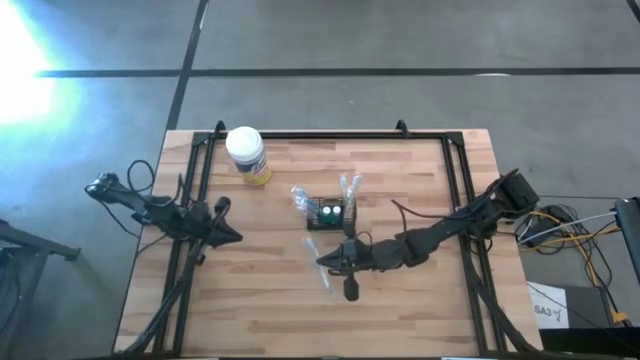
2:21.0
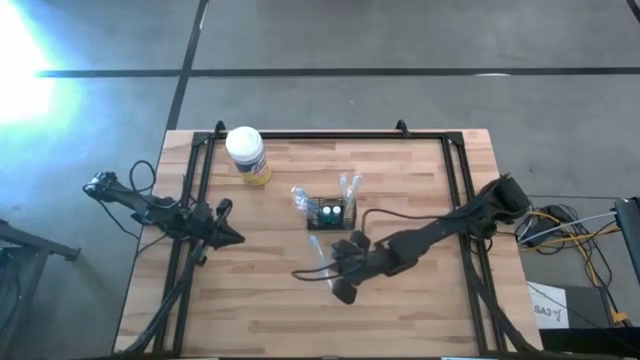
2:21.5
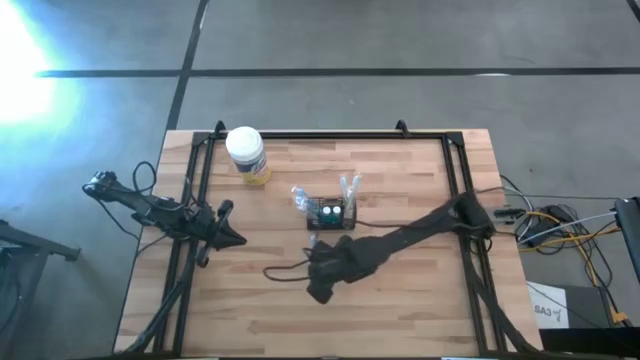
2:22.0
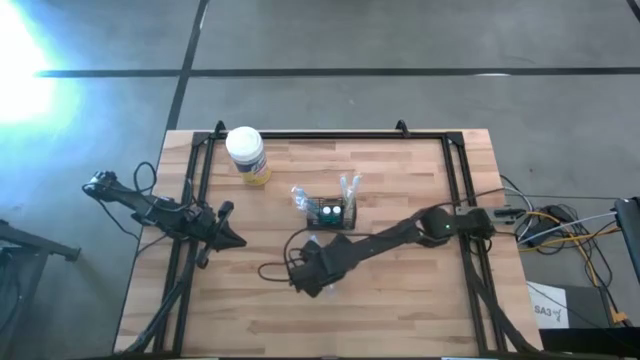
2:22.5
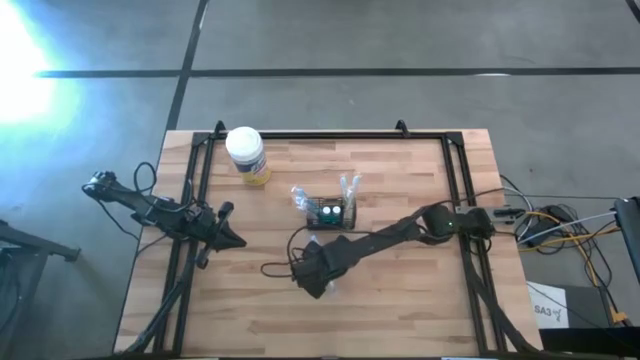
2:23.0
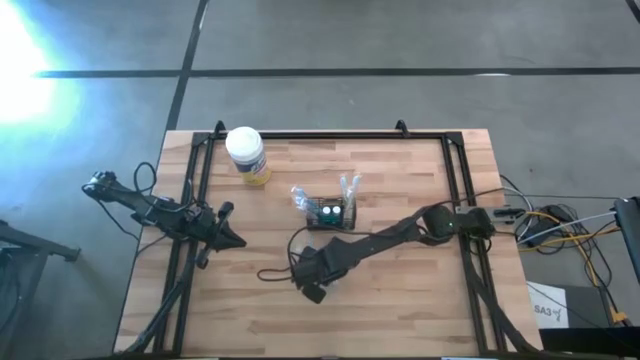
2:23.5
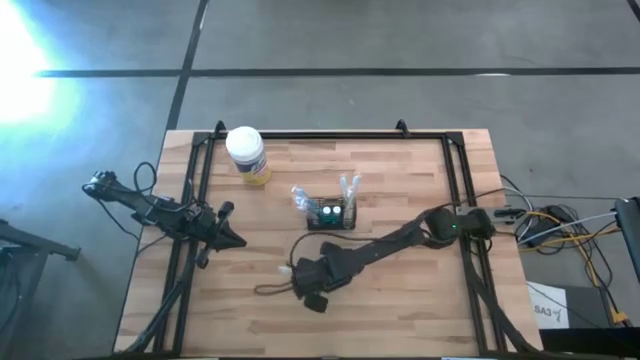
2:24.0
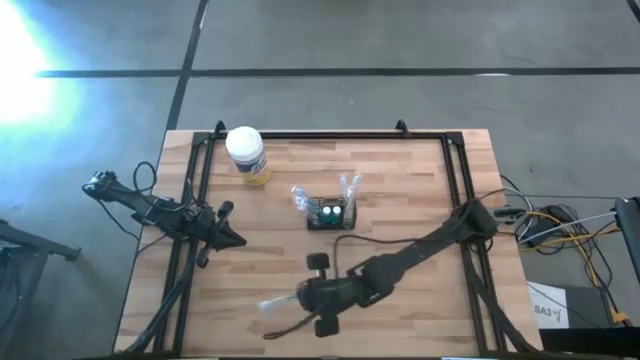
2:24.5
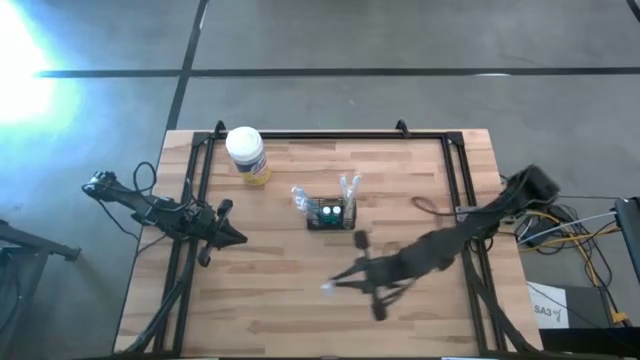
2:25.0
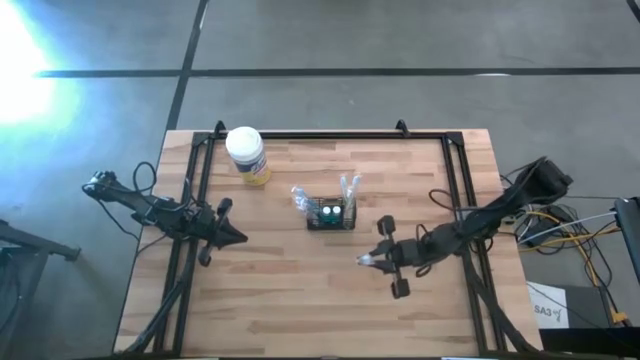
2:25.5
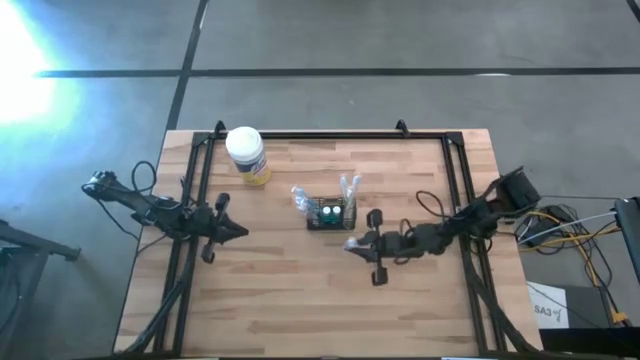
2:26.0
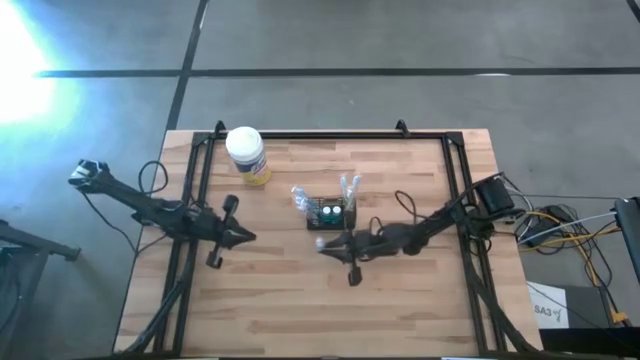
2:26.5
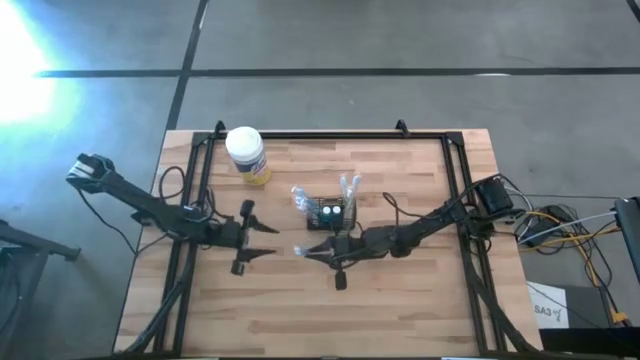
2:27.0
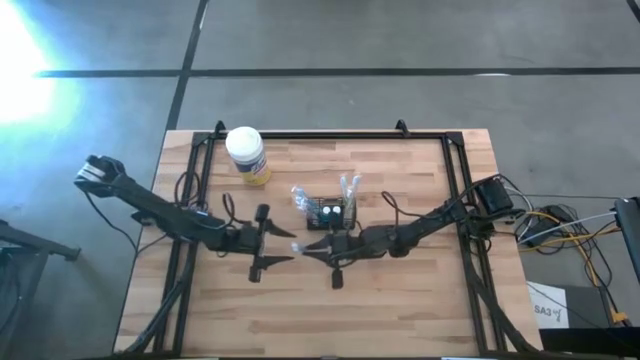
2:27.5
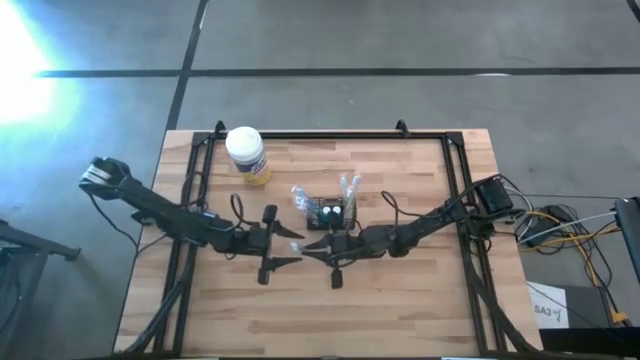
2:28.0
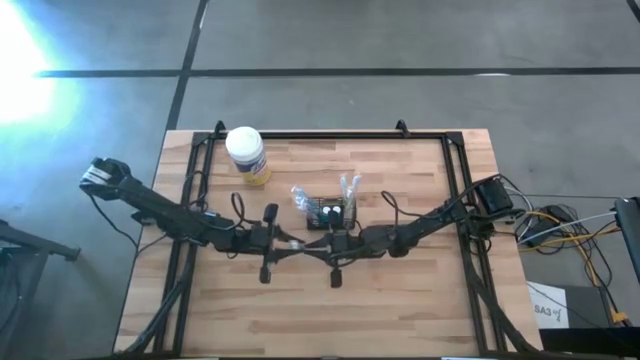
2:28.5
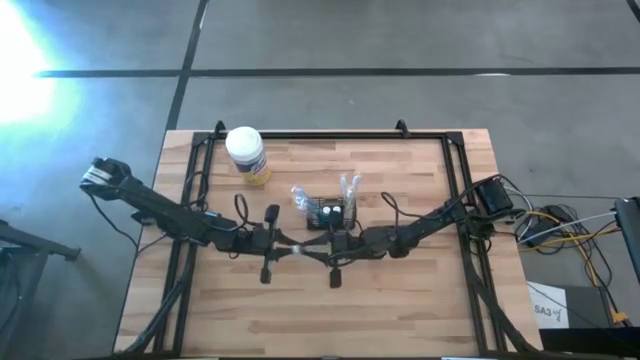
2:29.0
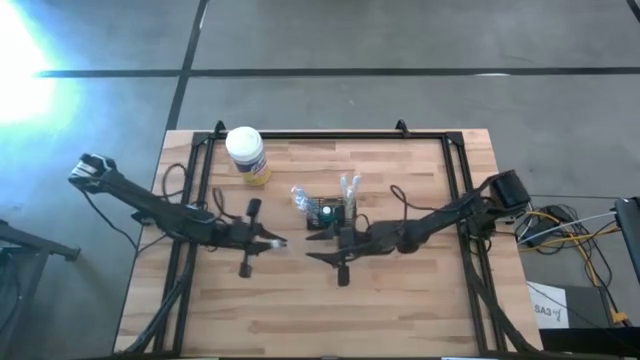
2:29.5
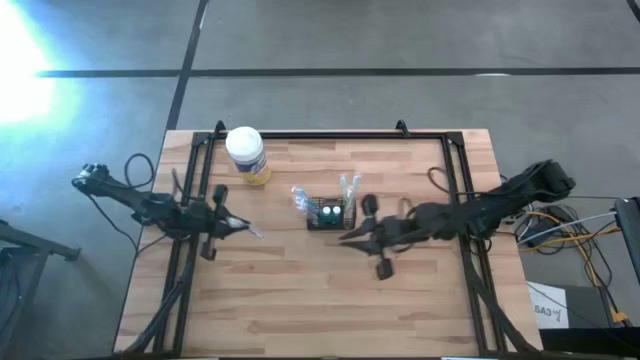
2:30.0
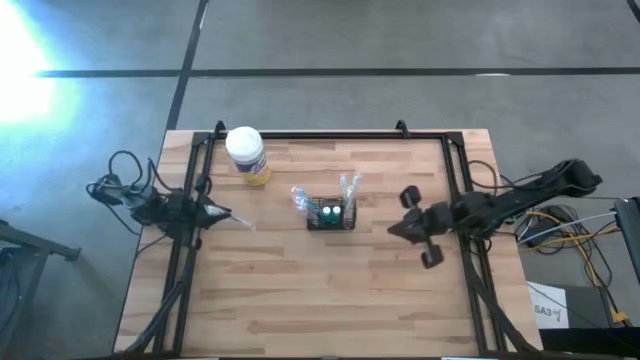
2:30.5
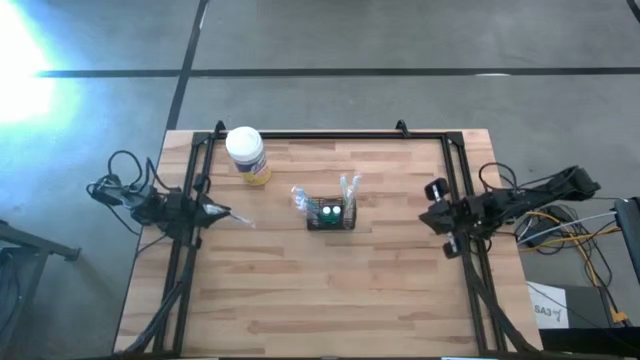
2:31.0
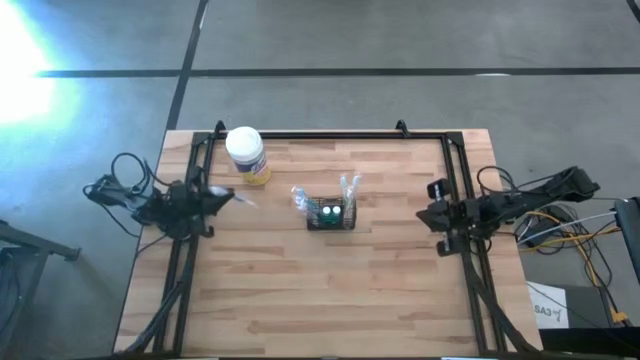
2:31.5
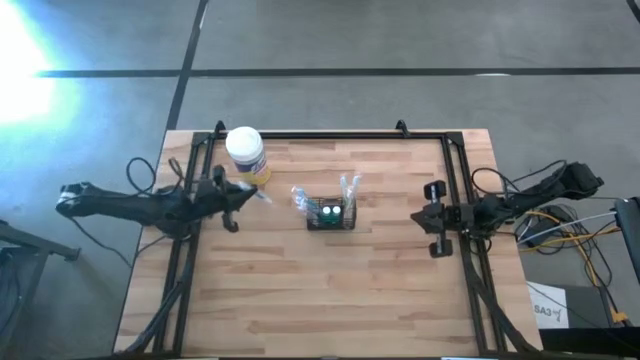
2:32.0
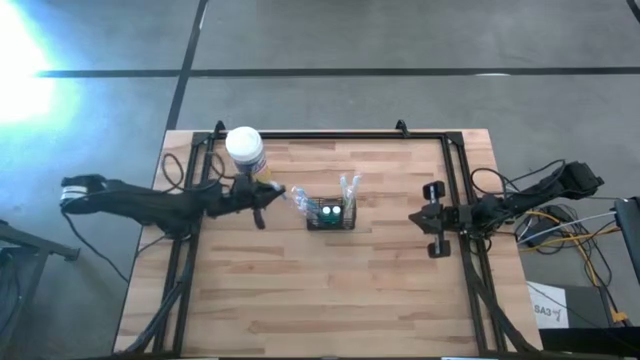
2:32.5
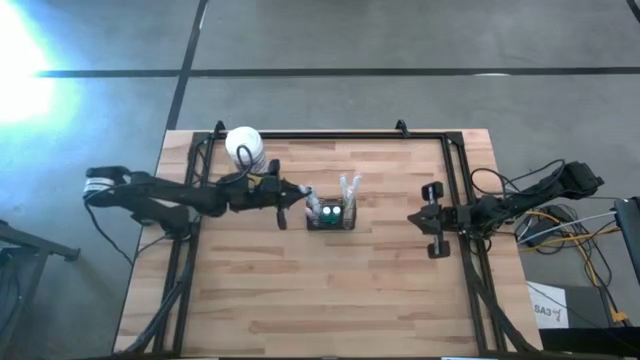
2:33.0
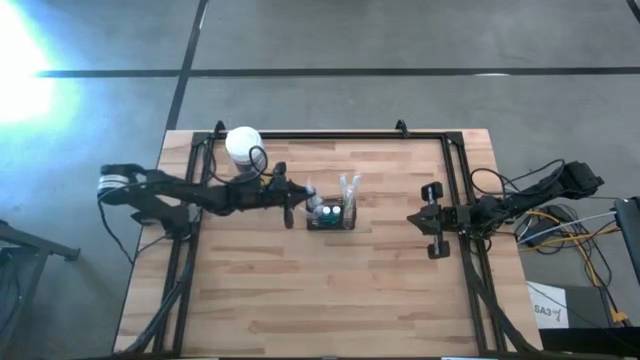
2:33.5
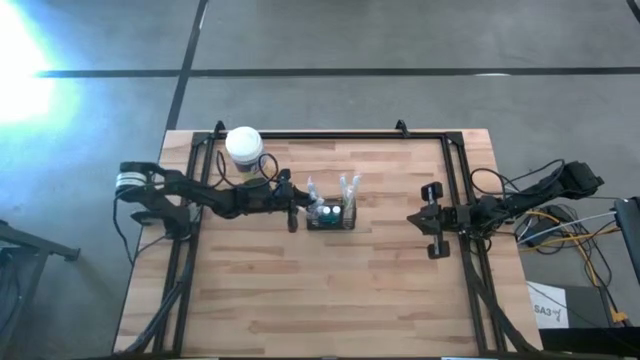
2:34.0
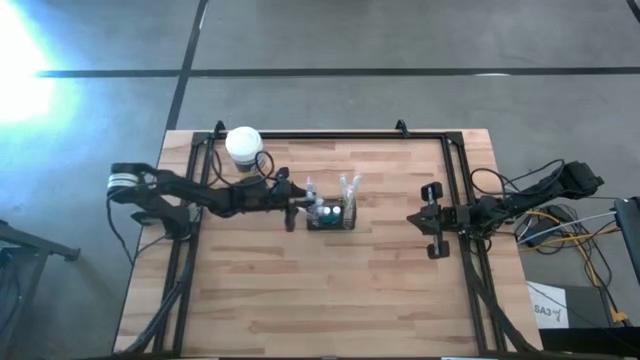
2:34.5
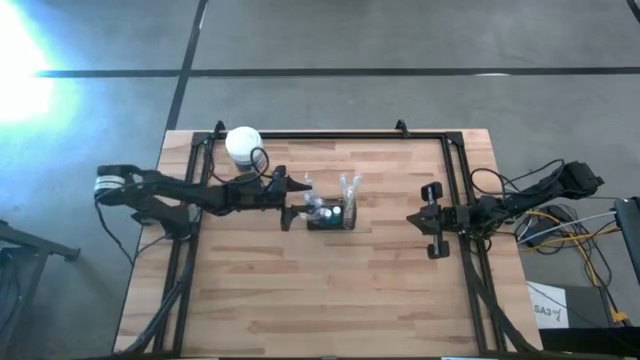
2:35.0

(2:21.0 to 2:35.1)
Task: Pick & Place toothbrushing station
Put the blue toothbrush into the black mesh organizer

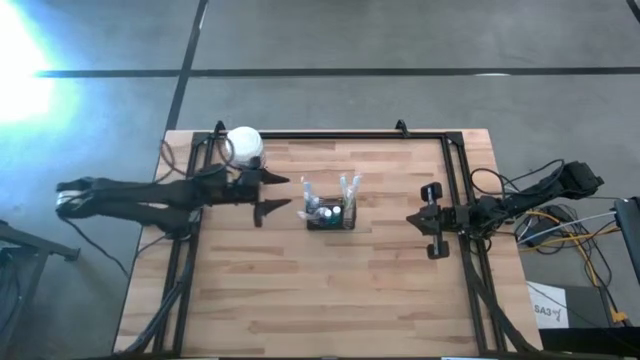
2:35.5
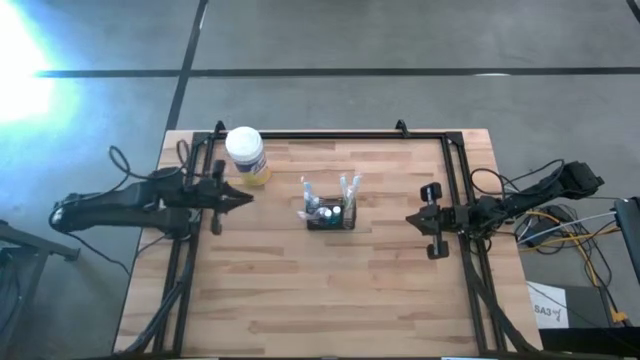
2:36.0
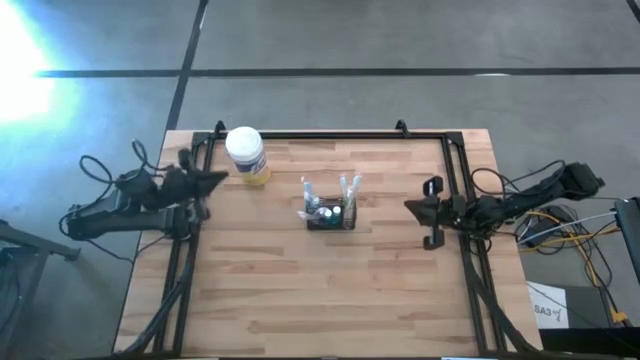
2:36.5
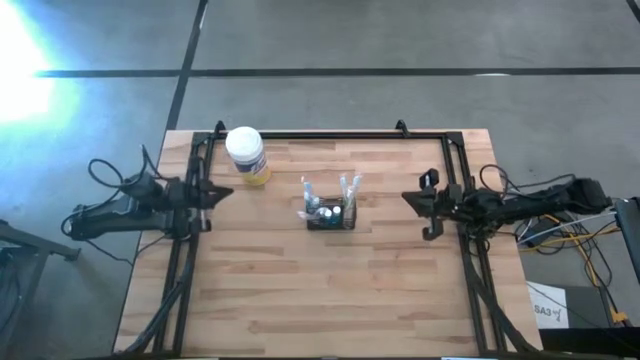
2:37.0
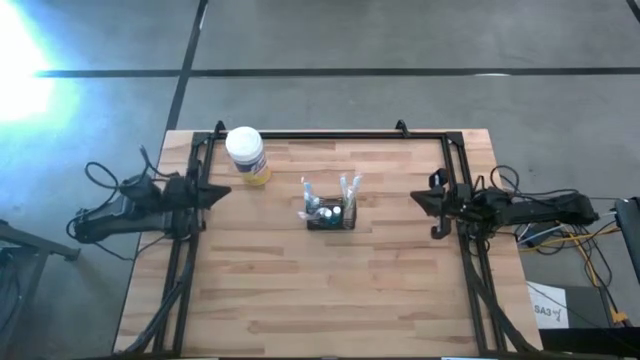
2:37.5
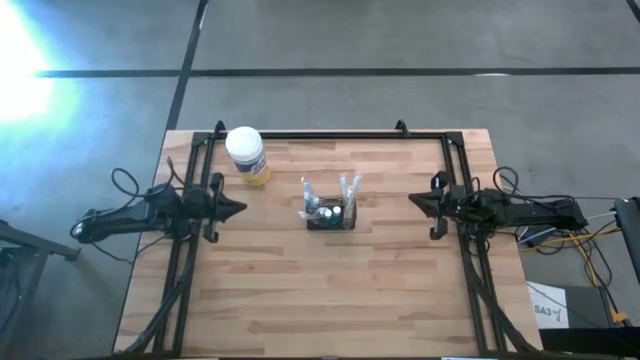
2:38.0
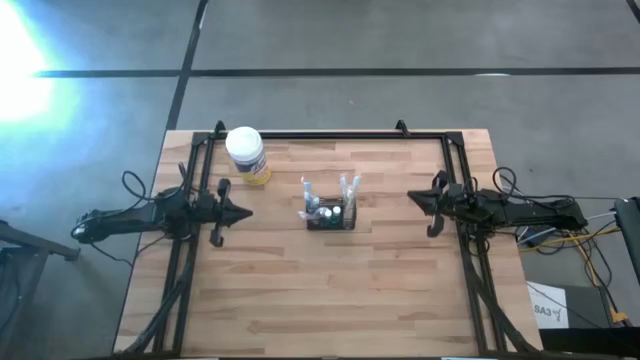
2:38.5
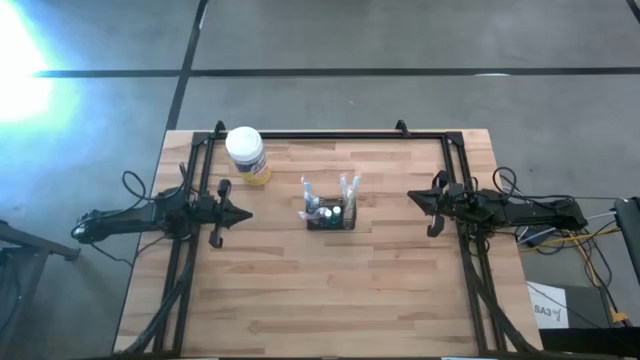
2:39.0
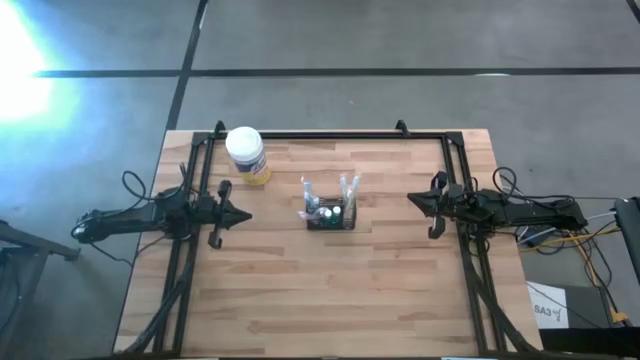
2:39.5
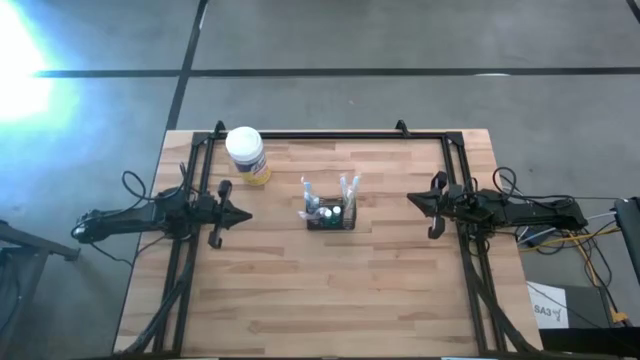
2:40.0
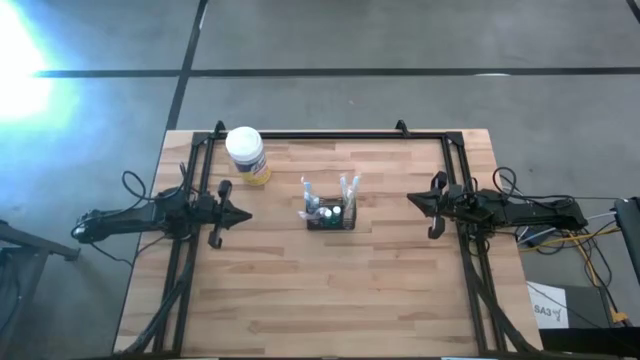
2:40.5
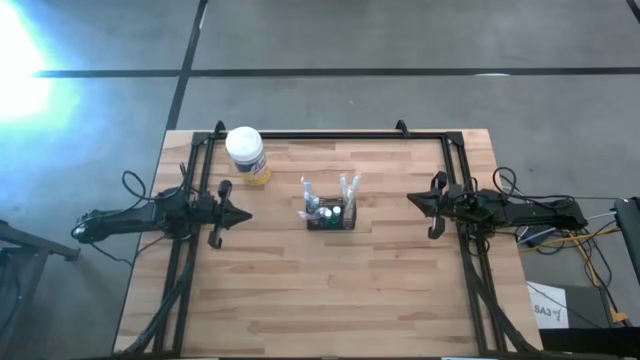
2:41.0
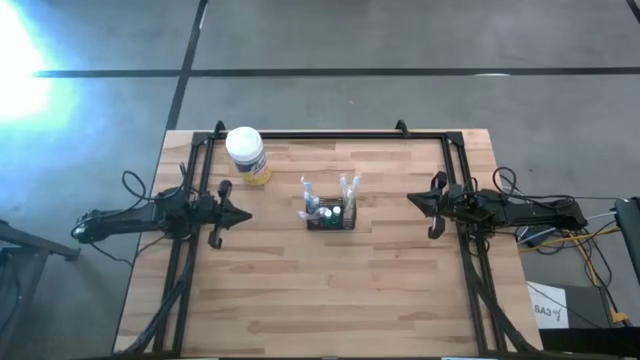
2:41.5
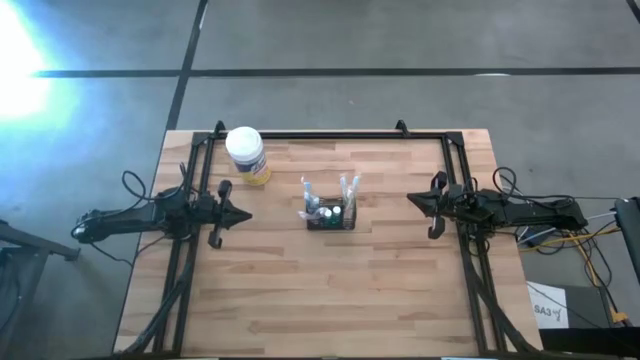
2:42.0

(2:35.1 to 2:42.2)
Return to Home Position
